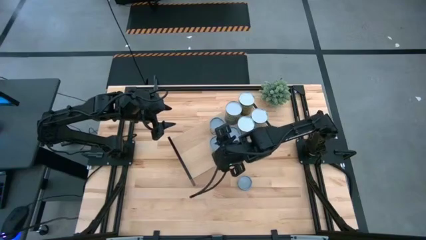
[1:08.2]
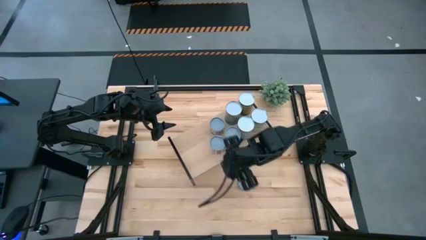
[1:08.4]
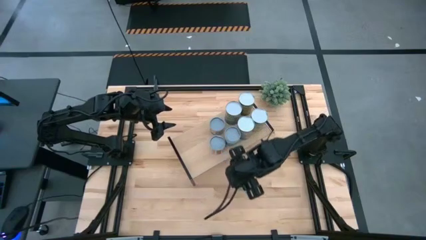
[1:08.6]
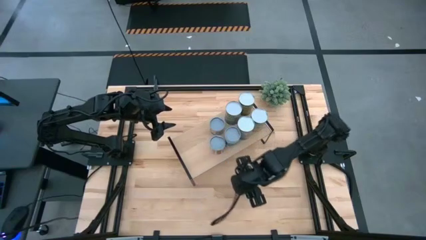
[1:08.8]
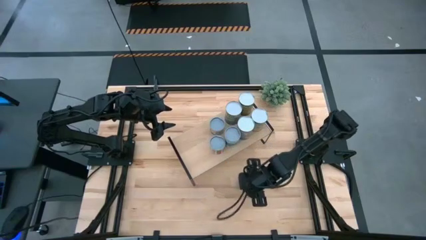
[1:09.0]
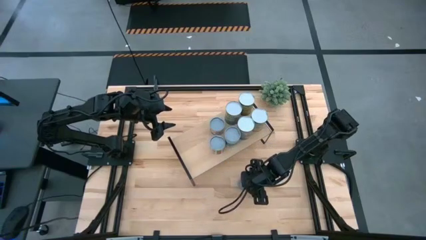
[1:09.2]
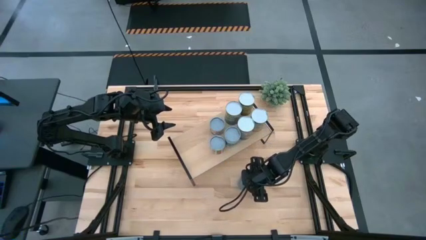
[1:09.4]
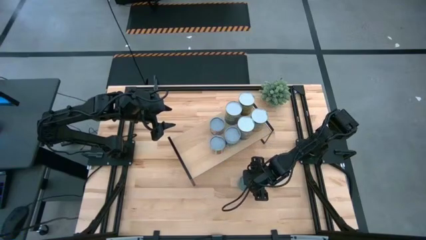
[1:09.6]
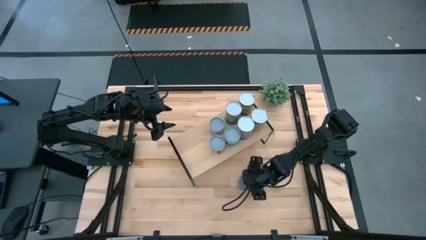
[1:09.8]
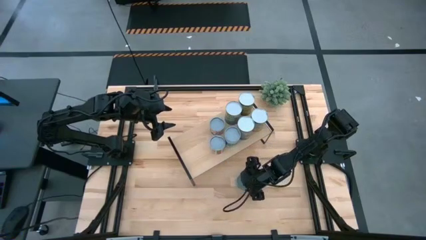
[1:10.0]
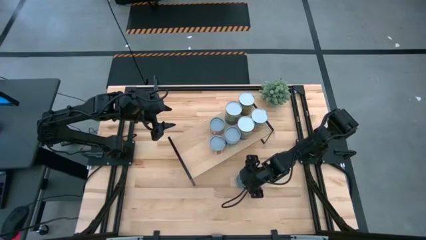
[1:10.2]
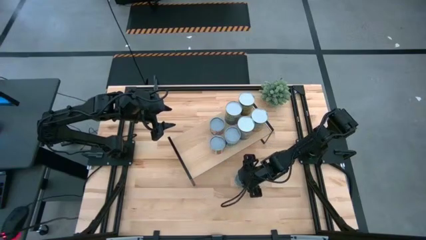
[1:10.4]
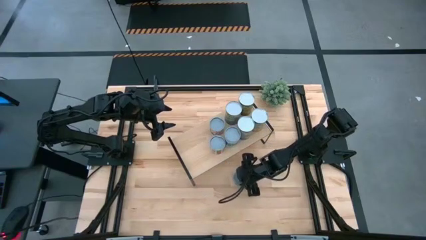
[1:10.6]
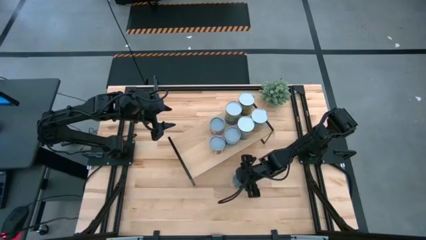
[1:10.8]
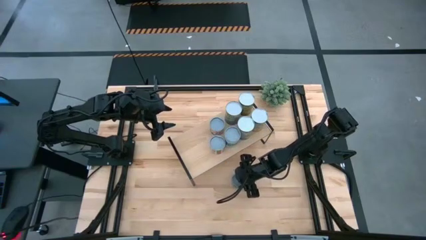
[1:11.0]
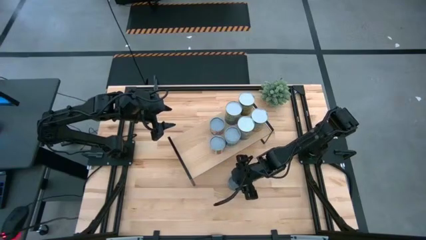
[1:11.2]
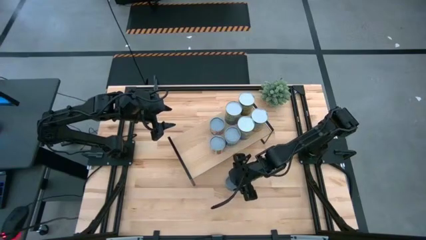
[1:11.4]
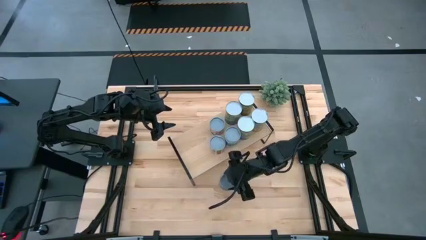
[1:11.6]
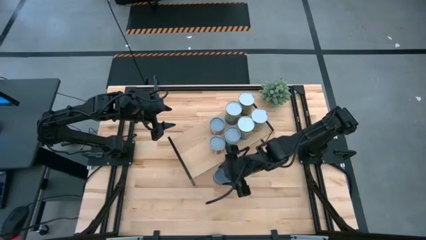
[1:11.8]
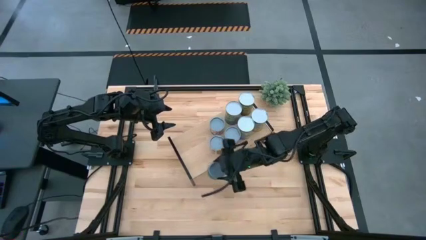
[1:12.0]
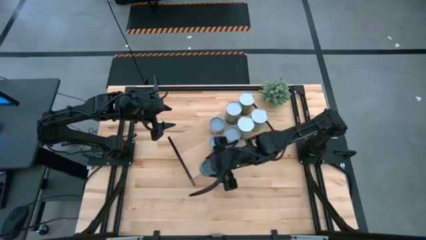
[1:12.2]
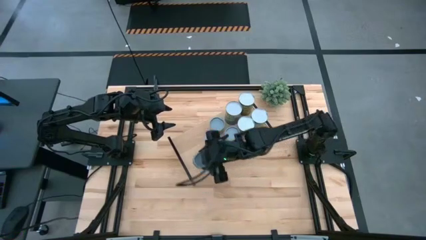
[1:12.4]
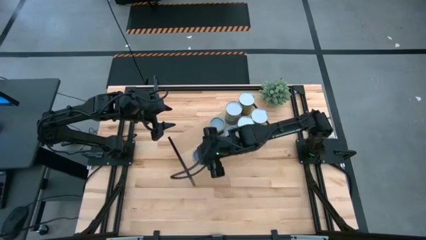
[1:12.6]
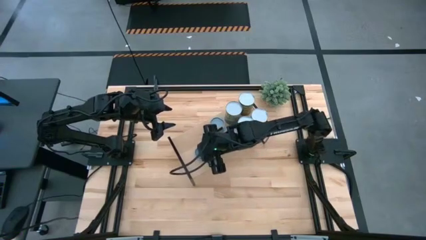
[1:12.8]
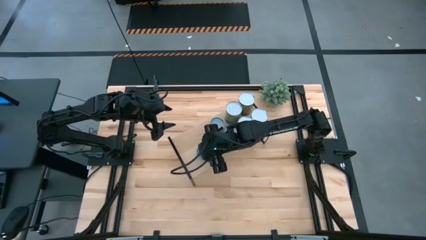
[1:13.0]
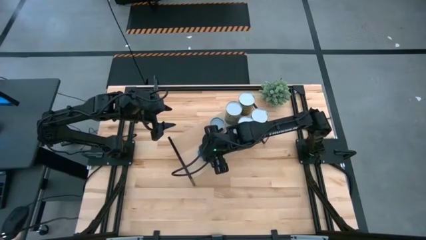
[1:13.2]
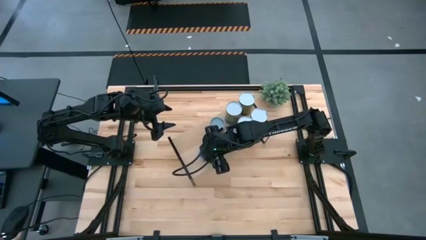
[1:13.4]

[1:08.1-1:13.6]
Task: Pick and place cans onto a shelf
Put the small tuna can on the shelf

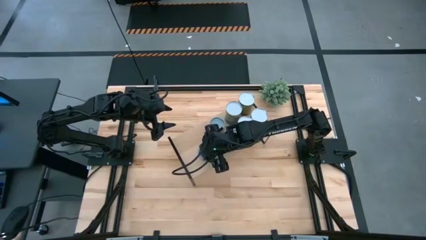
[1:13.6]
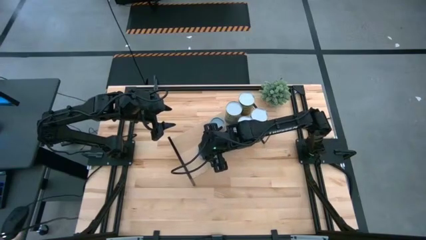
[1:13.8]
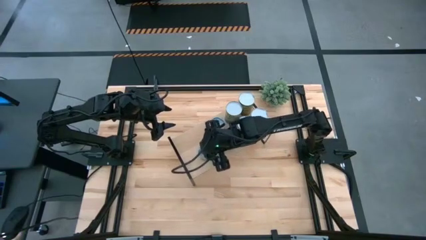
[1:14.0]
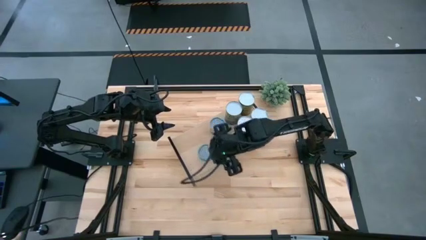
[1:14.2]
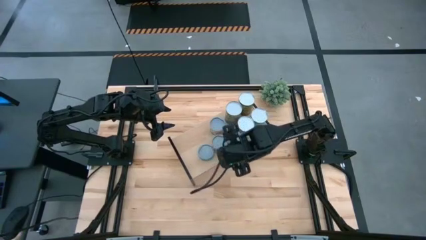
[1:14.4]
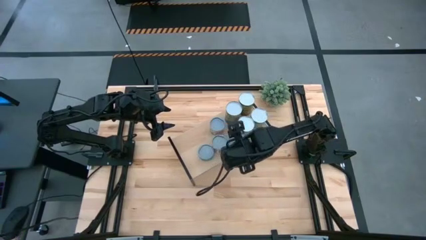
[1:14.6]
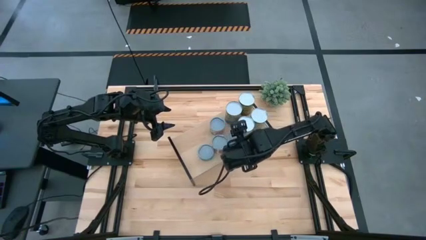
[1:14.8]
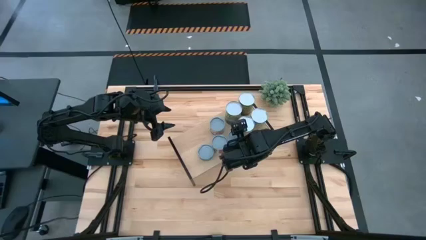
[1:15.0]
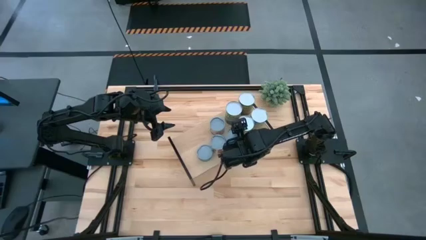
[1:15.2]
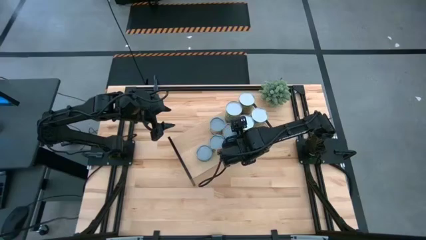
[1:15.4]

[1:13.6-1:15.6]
Adjust the big canned mixed vegetables on the shelf

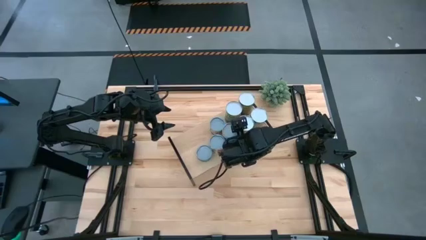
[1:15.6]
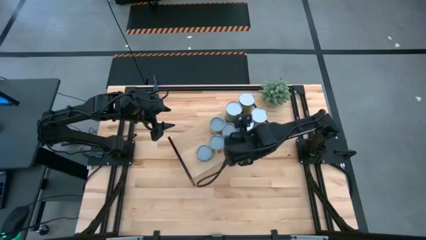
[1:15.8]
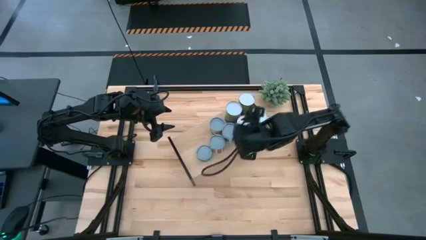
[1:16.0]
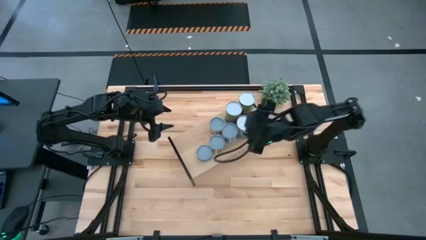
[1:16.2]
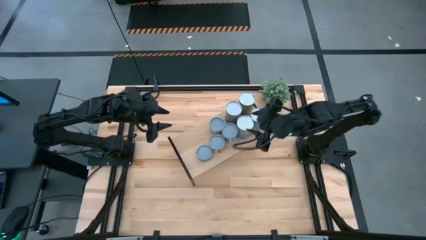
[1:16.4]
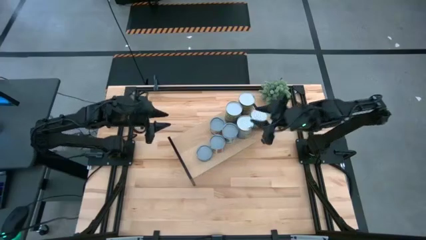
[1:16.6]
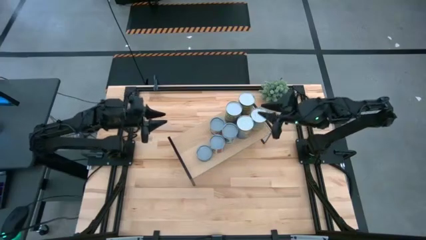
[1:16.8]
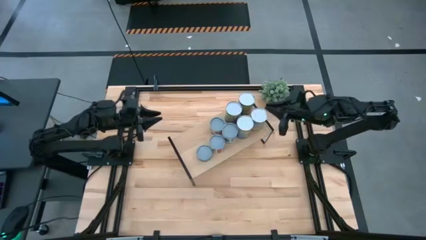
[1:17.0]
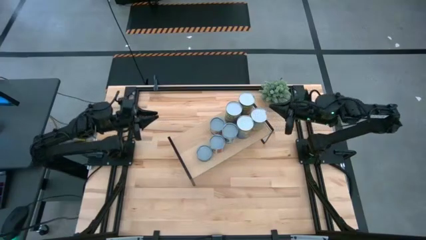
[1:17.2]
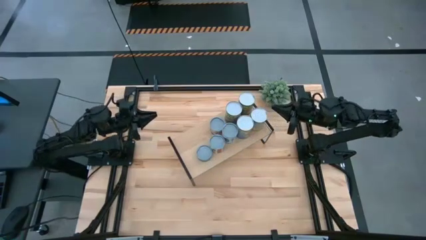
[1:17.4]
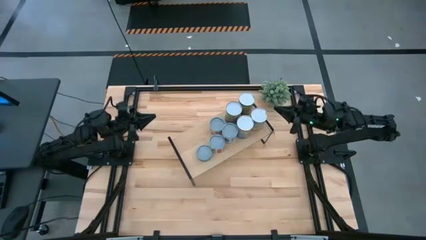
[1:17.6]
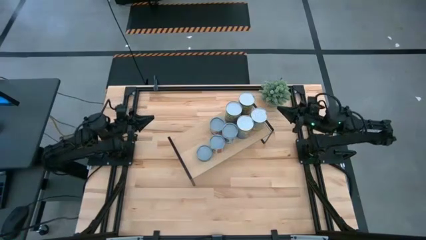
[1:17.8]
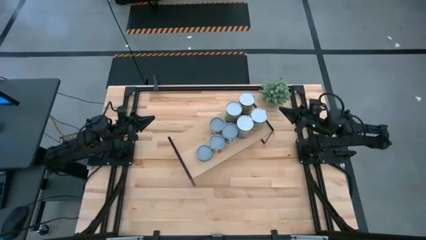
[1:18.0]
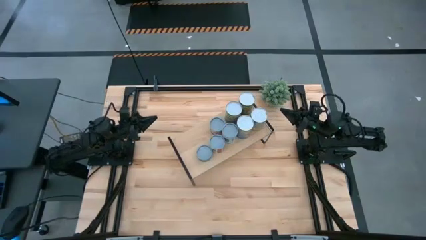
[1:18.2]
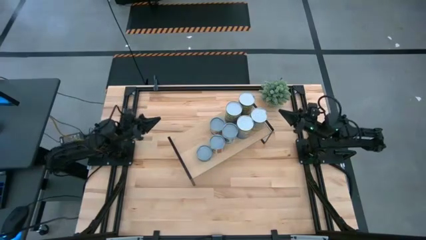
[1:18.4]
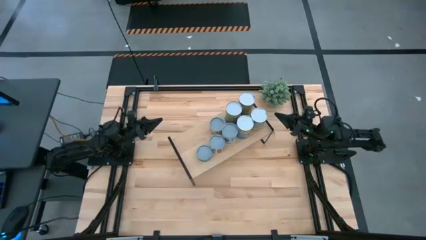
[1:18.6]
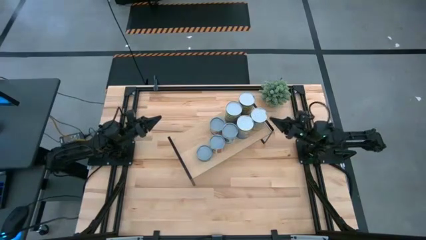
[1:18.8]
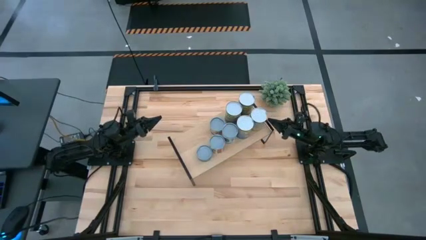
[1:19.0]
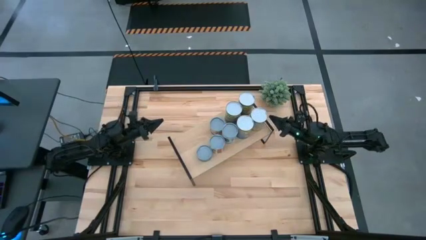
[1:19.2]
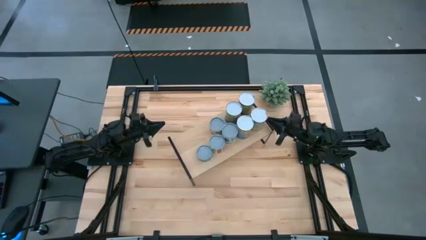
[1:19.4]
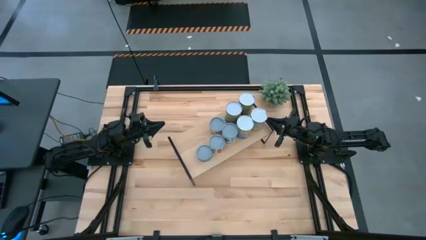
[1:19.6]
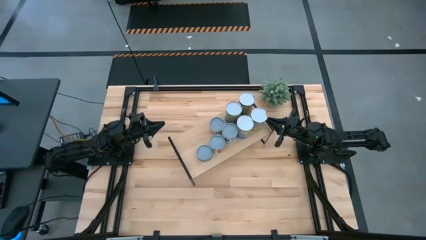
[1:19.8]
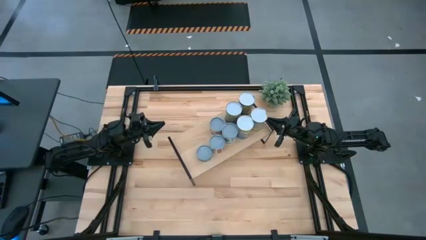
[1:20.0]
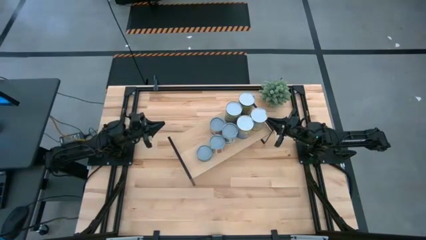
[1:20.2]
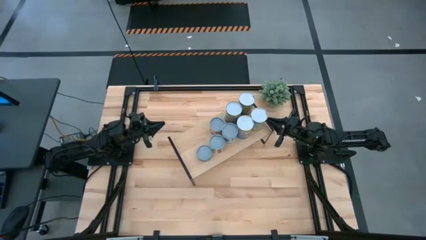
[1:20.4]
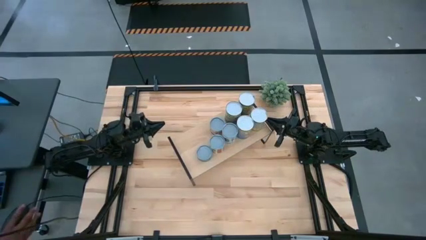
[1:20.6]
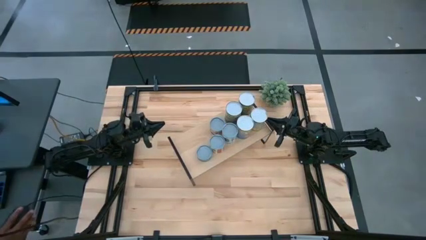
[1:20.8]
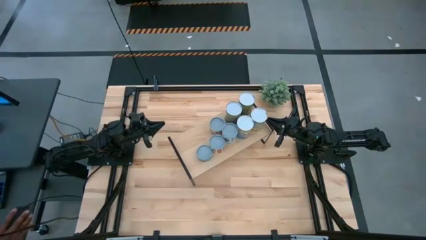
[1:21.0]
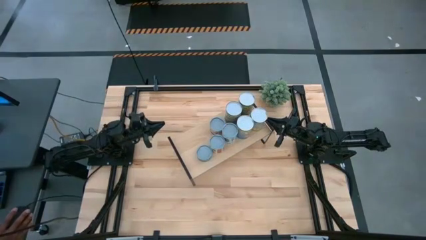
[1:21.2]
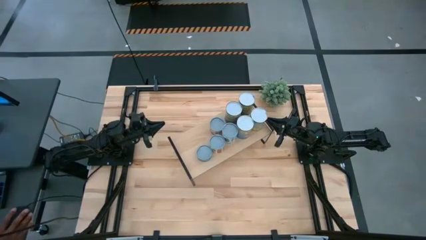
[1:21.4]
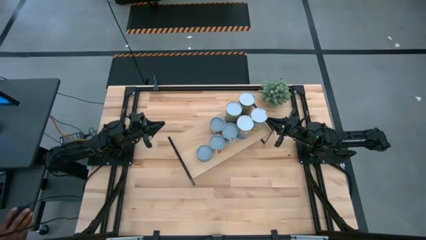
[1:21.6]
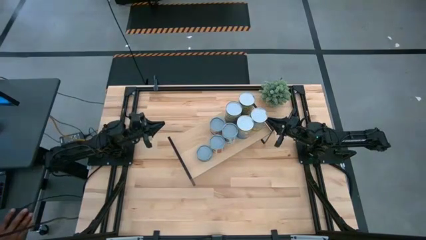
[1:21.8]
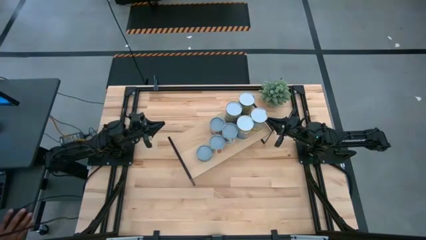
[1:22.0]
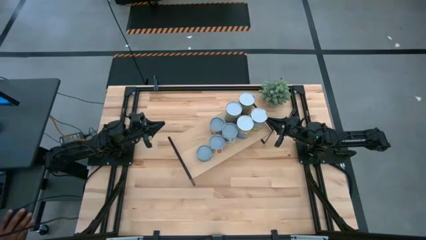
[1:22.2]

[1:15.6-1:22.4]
Return to Home Position
